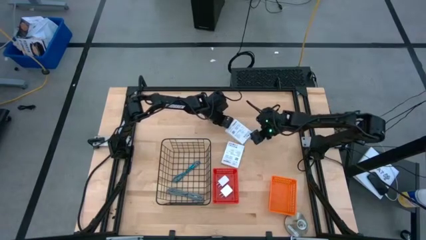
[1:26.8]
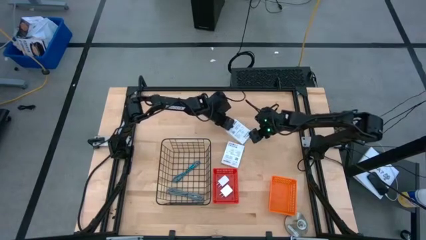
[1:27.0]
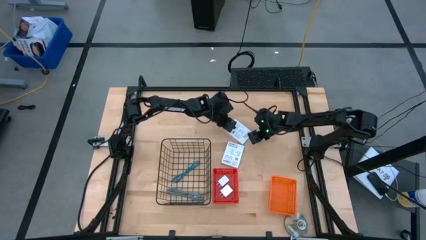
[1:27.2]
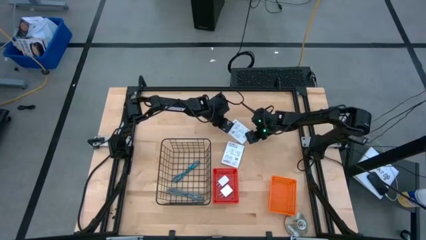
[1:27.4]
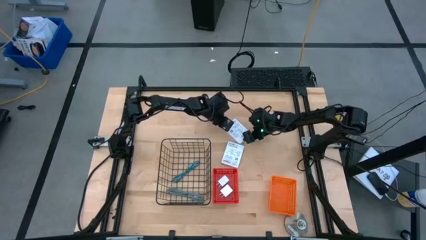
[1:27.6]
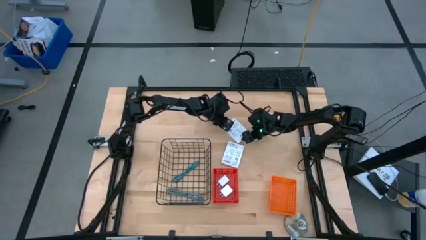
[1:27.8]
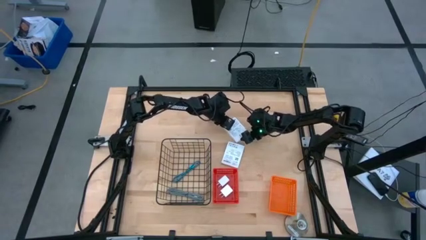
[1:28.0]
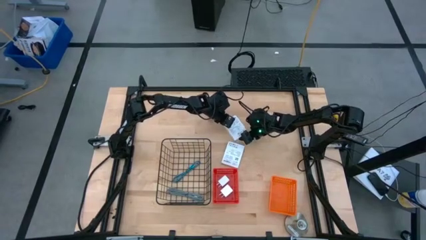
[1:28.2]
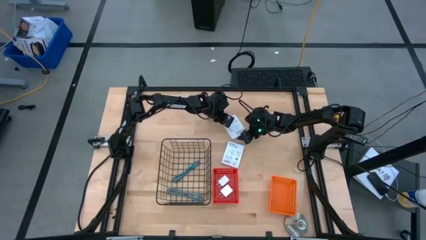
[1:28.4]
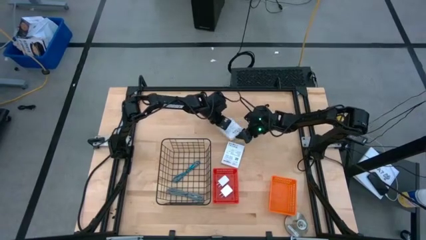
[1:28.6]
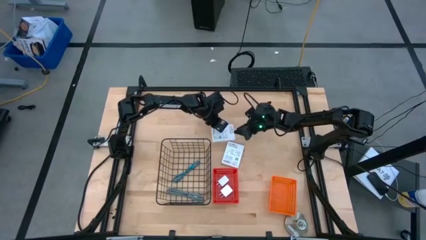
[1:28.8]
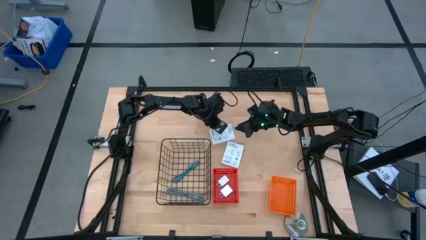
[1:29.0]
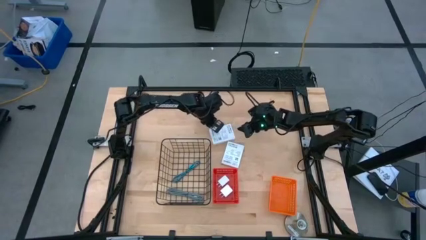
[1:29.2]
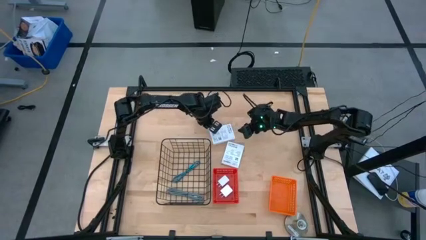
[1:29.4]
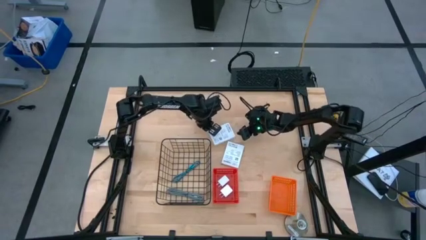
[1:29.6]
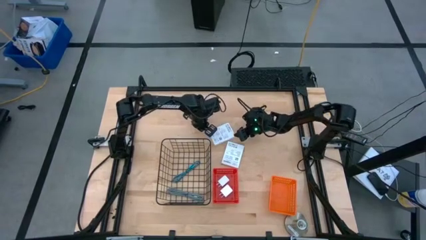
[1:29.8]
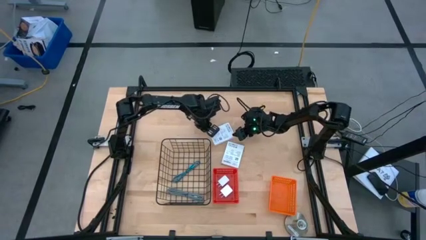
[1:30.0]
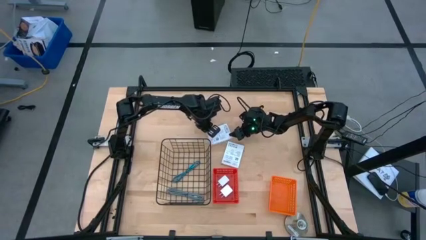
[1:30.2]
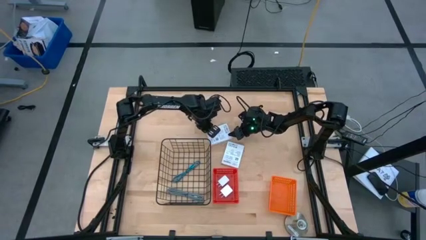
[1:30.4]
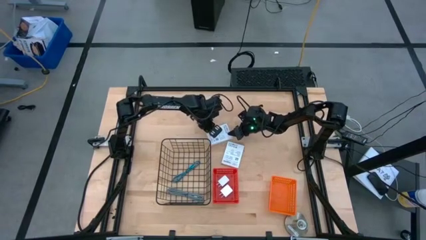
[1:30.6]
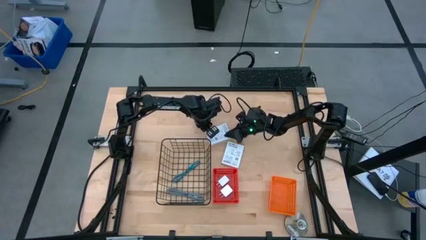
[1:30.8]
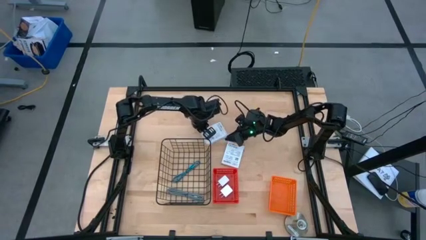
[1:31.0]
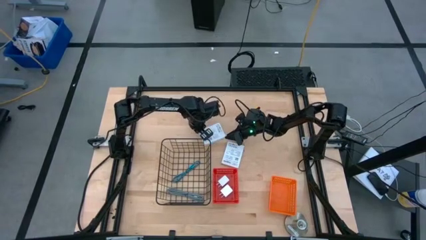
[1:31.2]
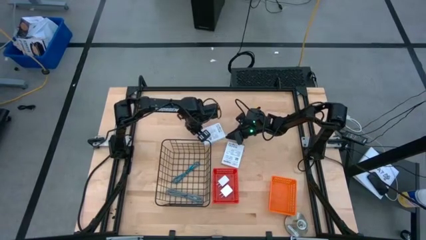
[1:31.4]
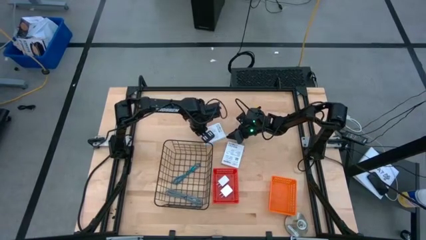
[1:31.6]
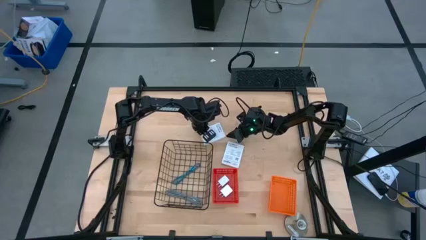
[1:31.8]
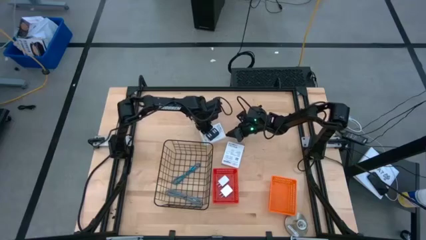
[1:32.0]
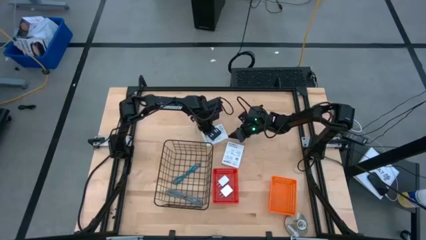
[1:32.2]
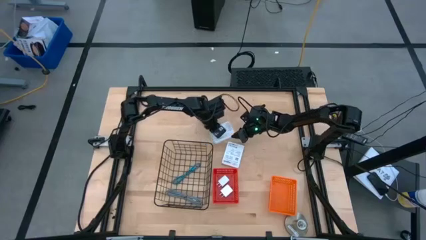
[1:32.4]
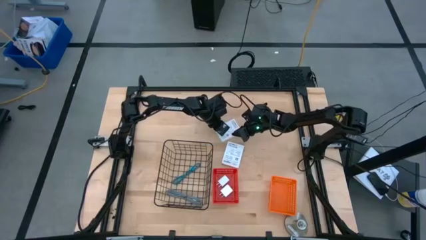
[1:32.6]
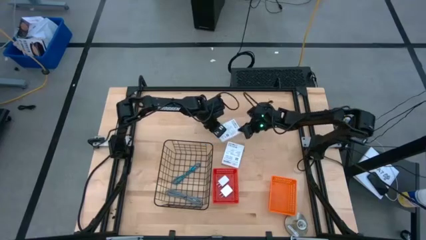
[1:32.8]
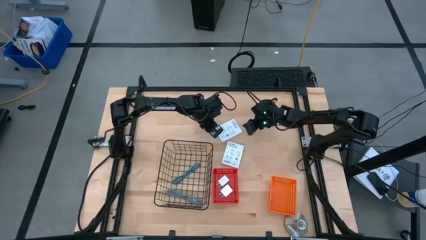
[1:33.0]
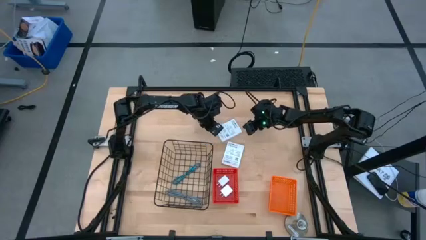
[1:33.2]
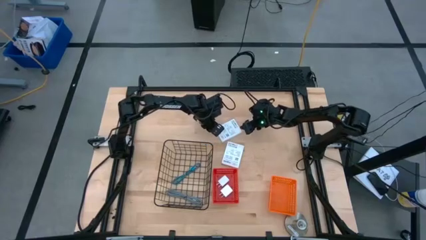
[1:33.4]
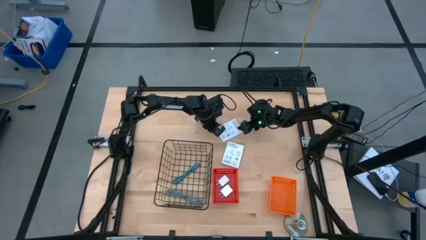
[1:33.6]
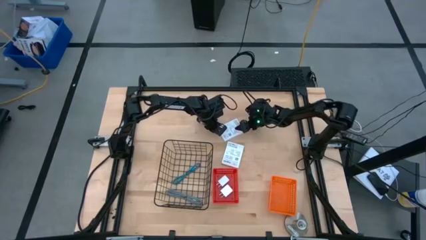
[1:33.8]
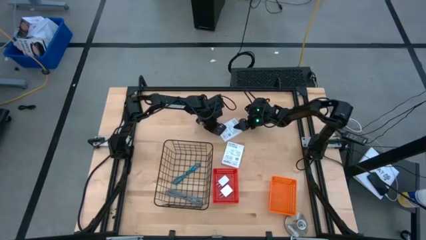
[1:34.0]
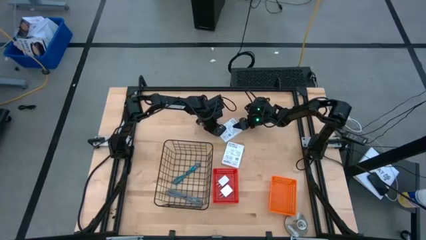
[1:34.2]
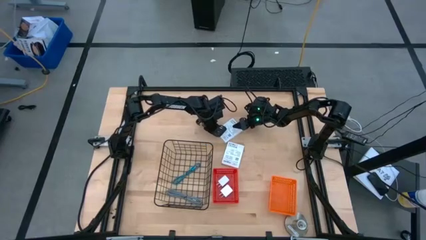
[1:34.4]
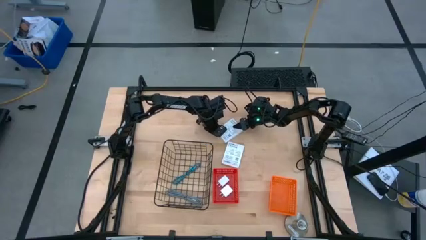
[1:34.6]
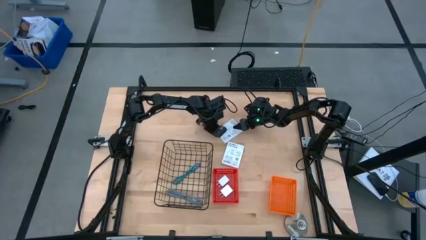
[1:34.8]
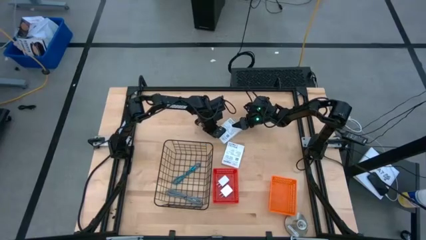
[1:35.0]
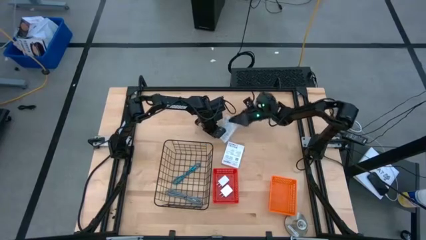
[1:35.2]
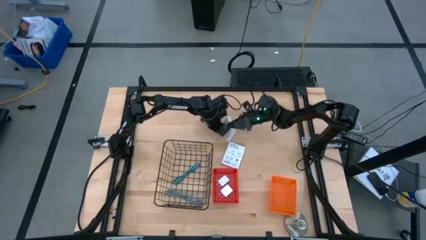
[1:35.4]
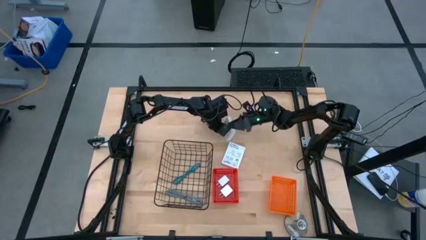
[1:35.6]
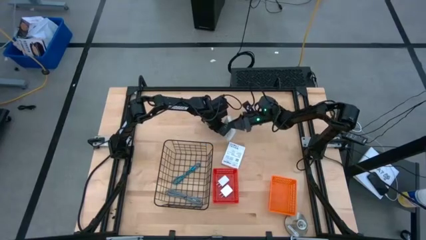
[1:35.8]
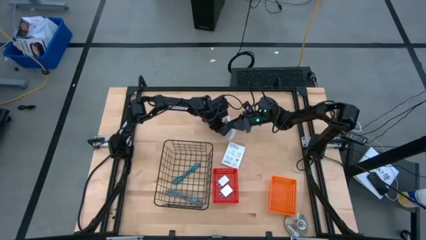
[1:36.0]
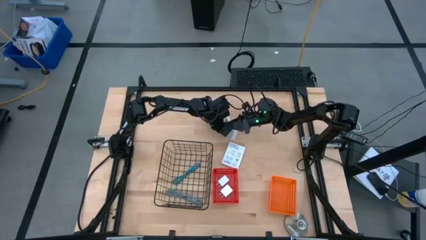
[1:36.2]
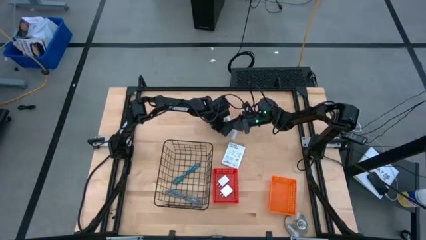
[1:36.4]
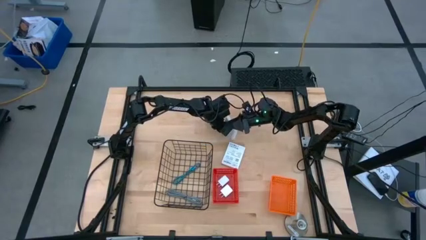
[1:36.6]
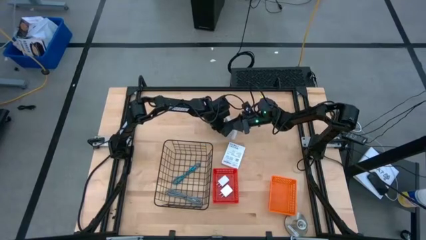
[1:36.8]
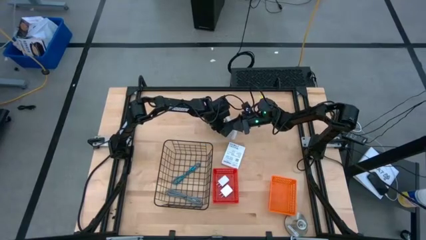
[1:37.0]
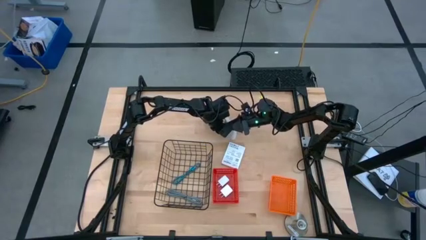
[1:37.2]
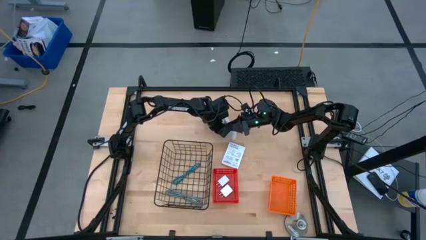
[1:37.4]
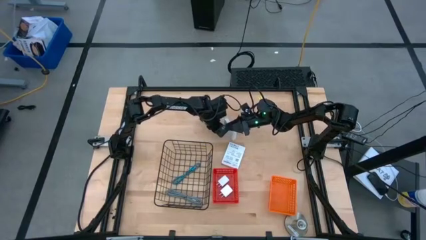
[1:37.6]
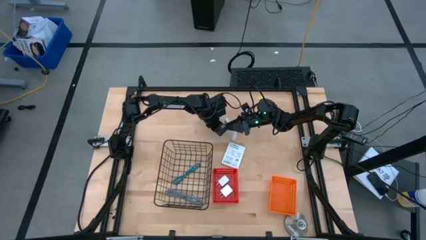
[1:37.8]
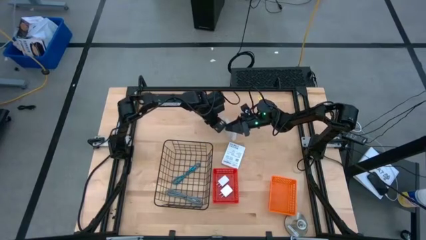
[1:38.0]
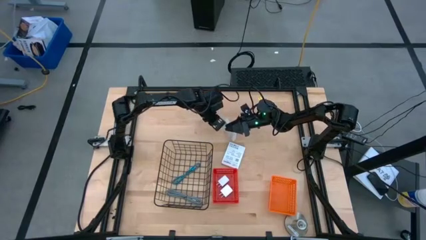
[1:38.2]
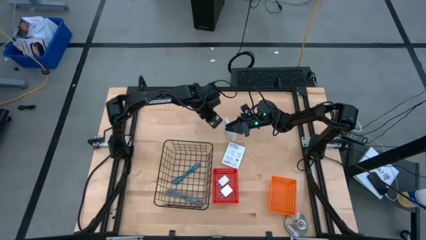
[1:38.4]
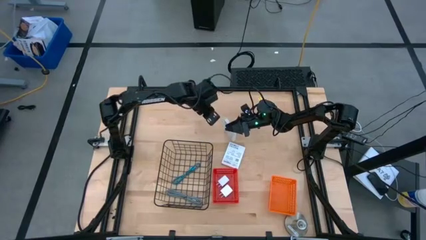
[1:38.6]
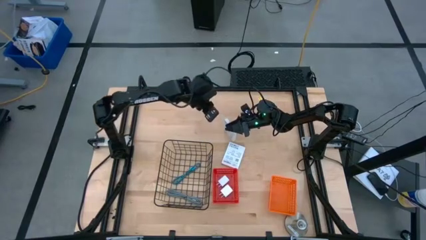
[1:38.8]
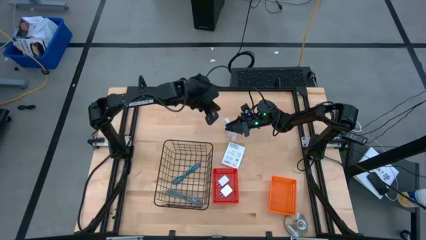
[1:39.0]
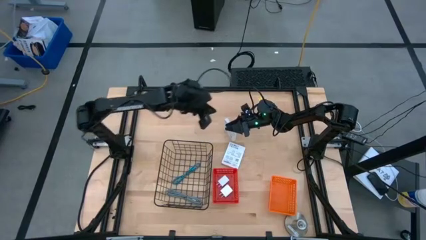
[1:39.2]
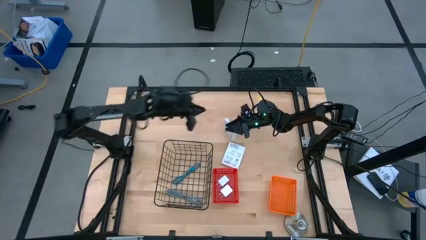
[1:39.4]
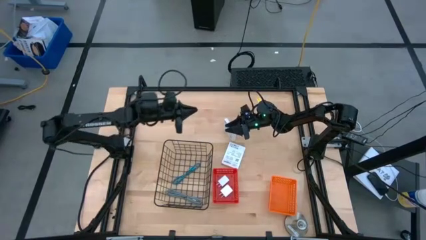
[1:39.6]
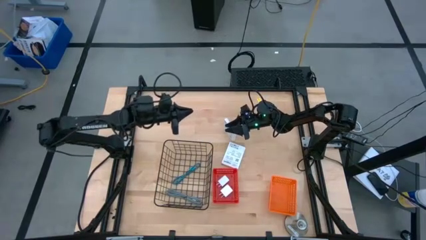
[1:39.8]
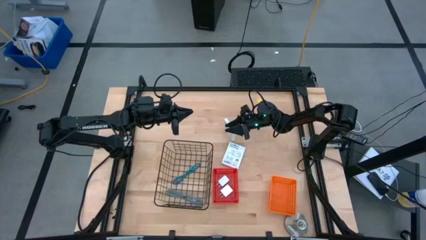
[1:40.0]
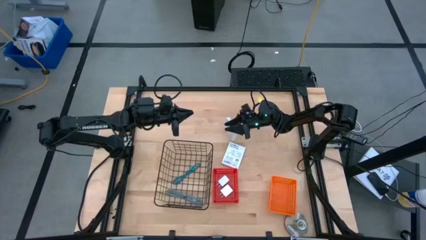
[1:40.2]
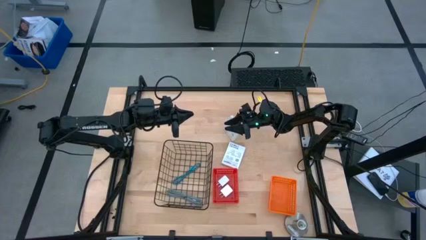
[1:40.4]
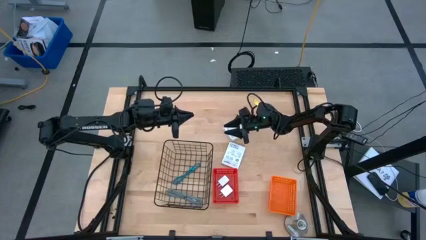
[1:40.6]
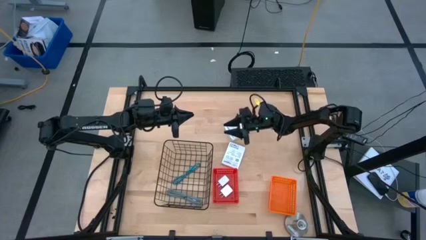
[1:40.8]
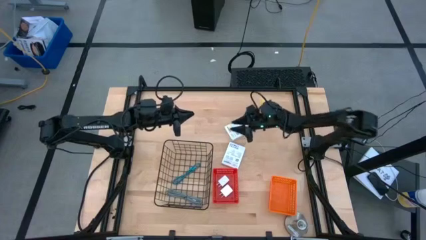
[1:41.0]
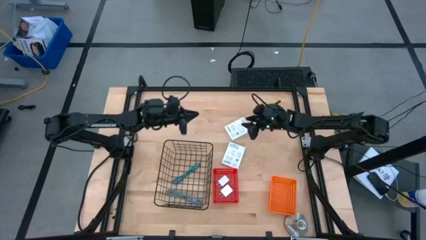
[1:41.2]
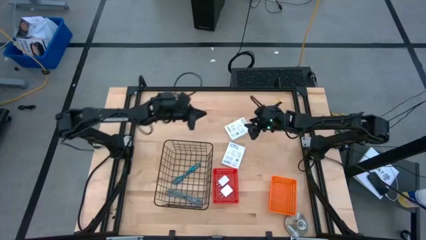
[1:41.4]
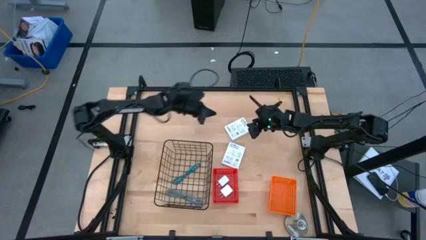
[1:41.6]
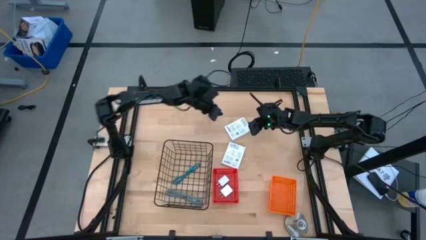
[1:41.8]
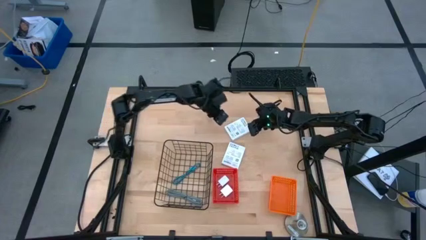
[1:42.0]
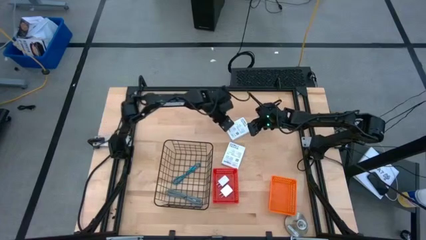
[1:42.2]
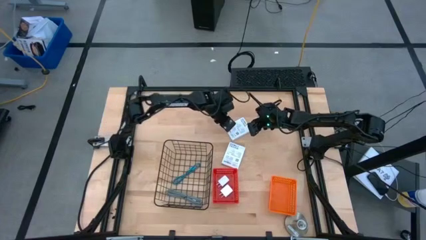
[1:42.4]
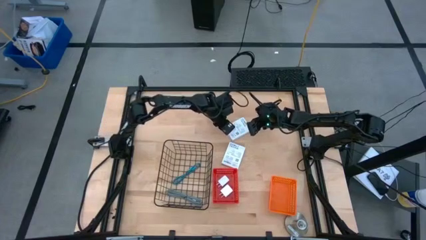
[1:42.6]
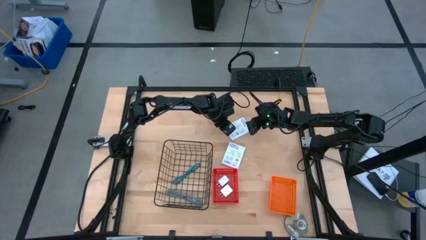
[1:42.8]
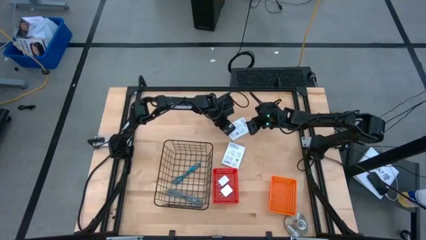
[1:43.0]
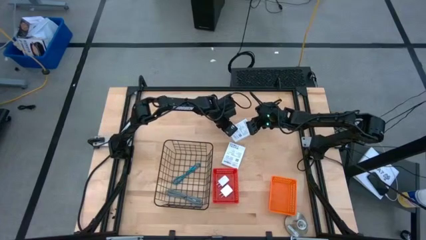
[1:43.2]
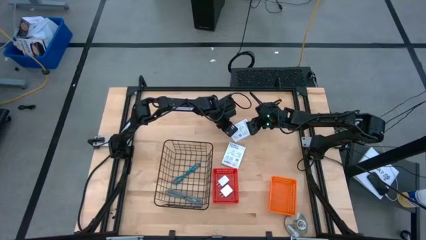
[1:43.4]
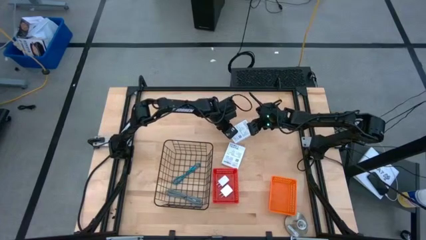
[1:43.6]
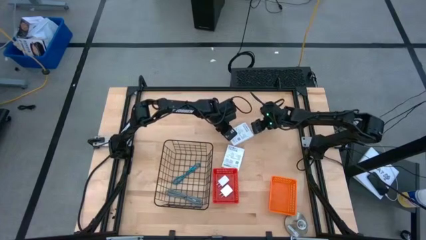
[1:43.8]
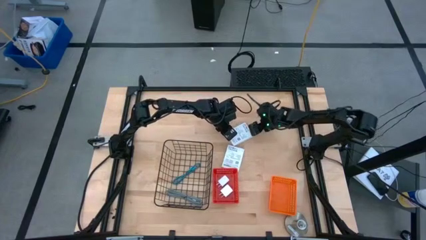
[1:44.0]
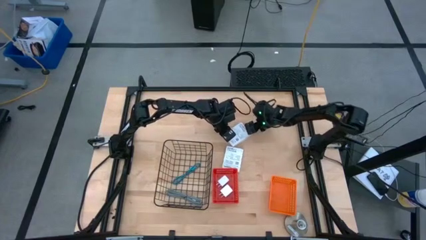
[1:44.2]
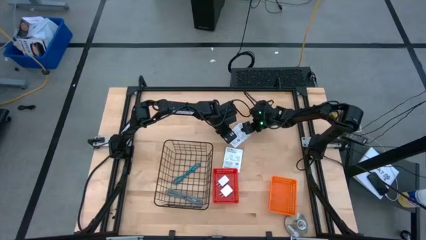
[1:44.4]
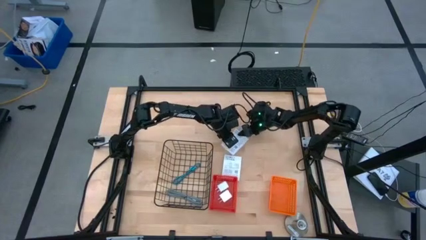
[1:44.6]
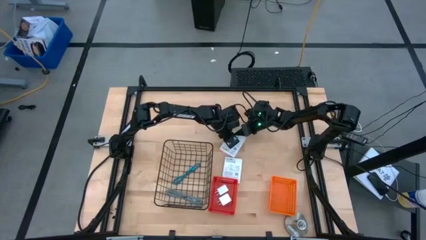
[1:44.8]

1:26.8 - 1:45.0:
Task: Pick and place items into bin
Put the top card reader box into the orange basket
